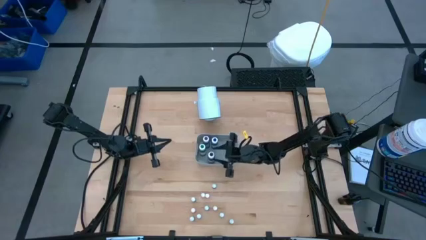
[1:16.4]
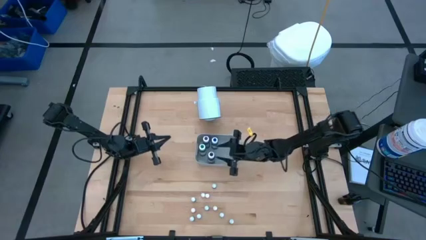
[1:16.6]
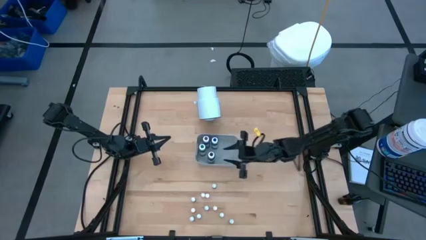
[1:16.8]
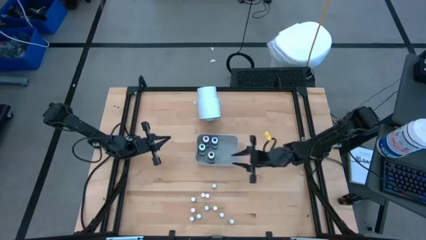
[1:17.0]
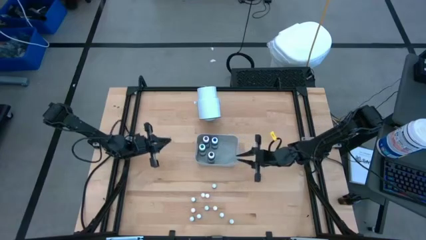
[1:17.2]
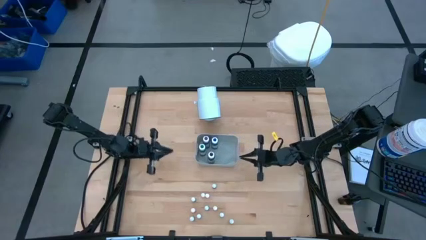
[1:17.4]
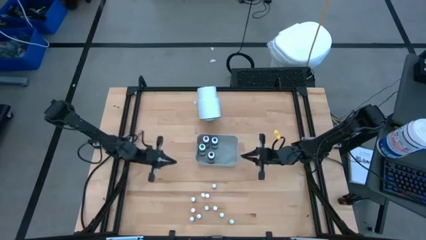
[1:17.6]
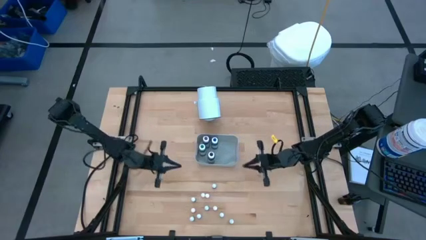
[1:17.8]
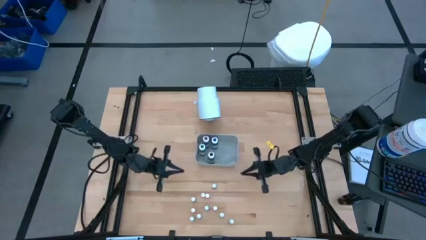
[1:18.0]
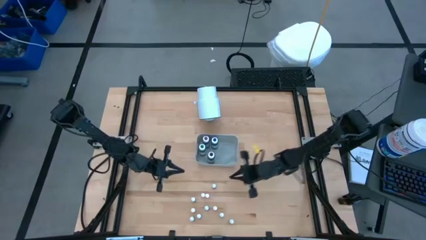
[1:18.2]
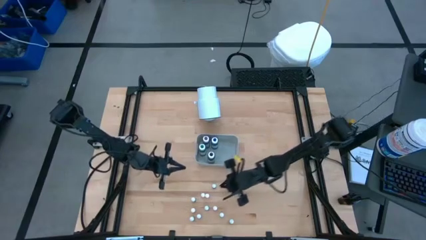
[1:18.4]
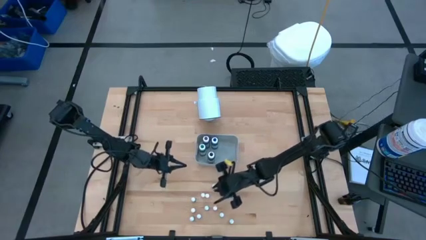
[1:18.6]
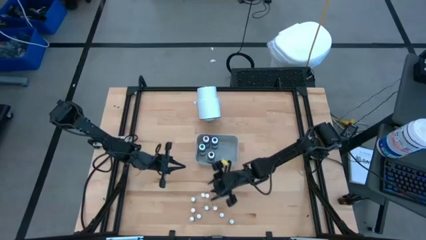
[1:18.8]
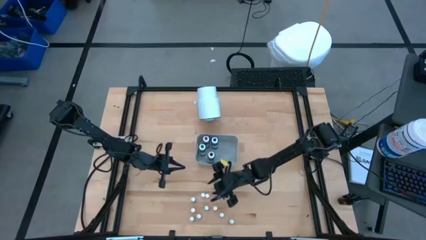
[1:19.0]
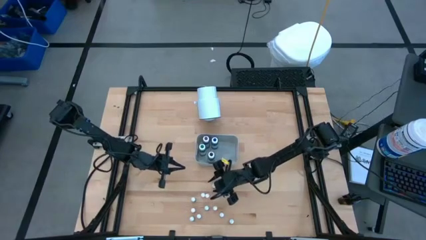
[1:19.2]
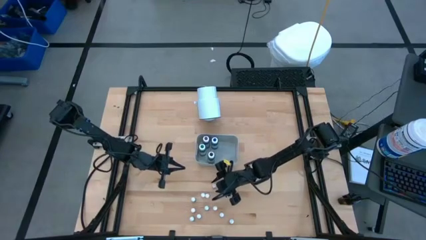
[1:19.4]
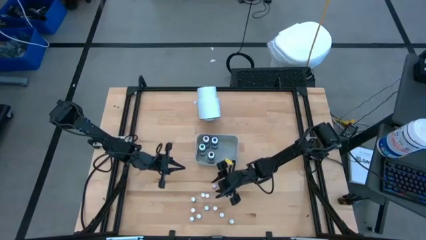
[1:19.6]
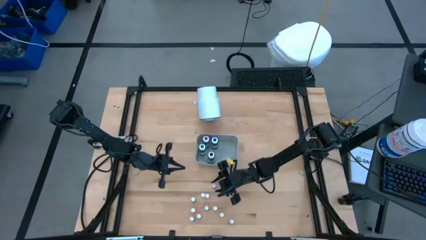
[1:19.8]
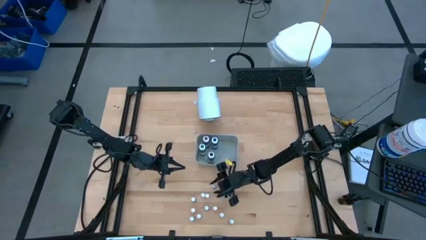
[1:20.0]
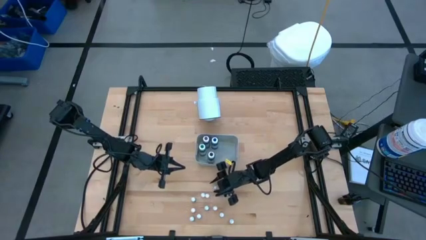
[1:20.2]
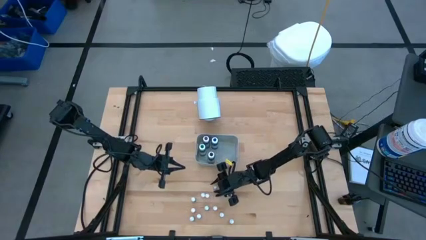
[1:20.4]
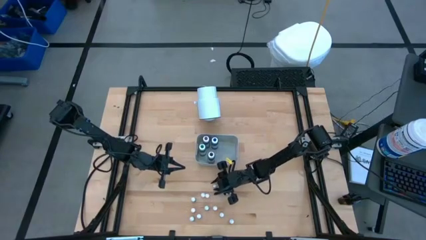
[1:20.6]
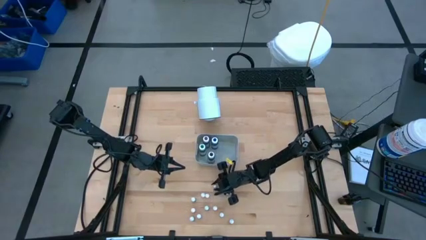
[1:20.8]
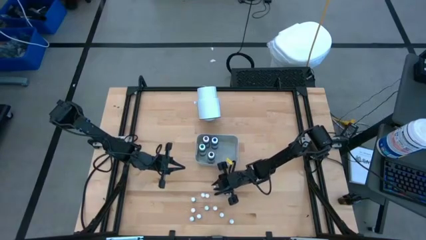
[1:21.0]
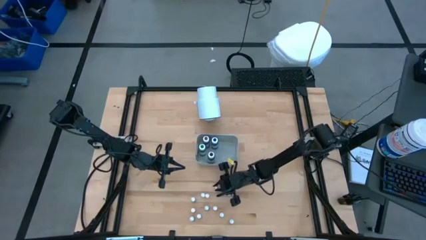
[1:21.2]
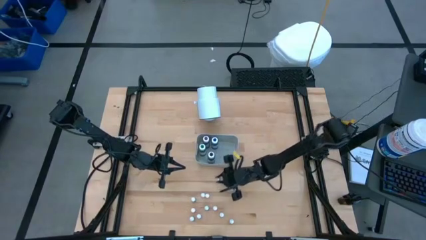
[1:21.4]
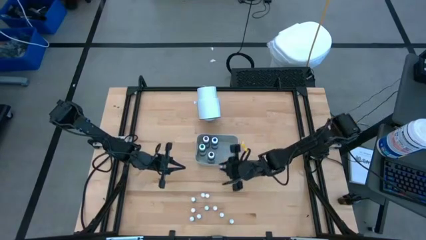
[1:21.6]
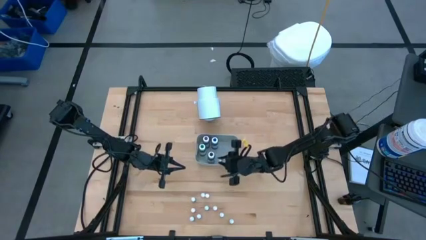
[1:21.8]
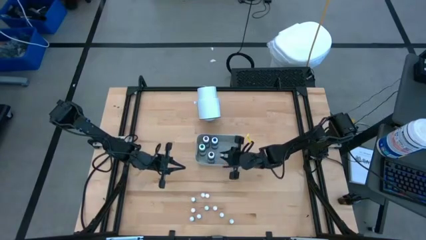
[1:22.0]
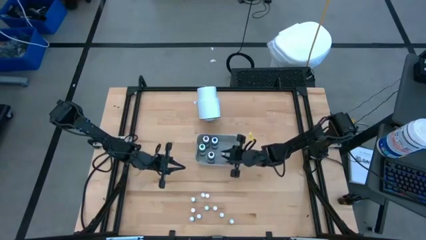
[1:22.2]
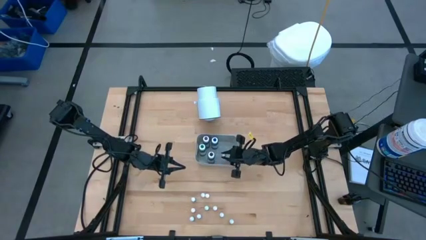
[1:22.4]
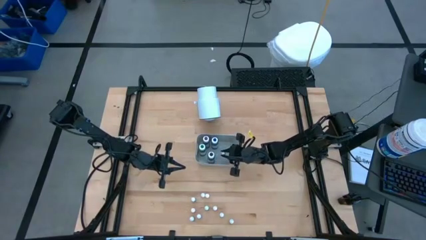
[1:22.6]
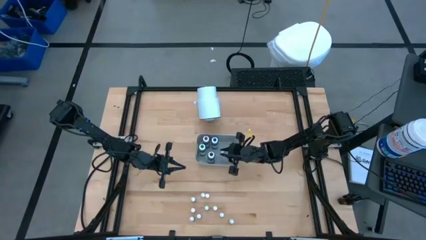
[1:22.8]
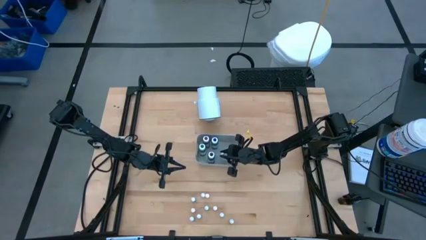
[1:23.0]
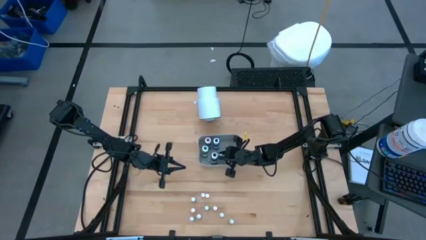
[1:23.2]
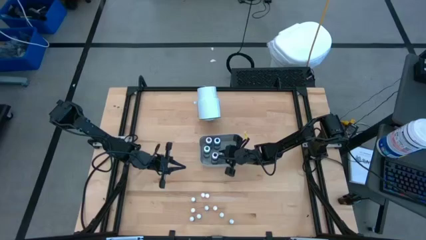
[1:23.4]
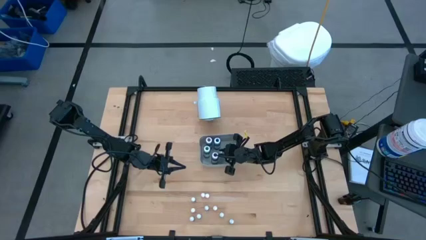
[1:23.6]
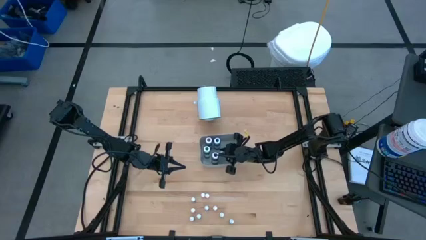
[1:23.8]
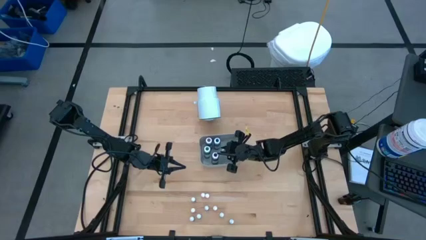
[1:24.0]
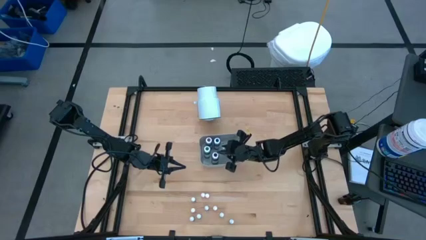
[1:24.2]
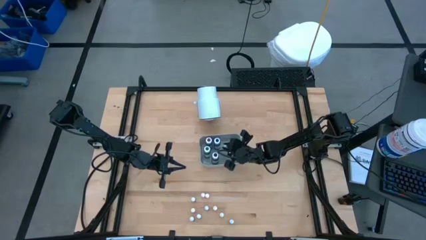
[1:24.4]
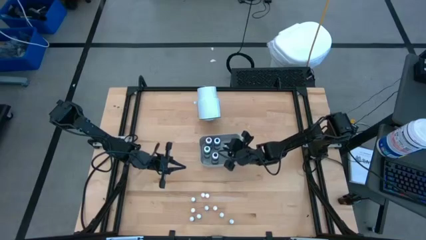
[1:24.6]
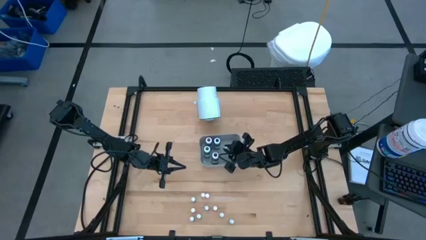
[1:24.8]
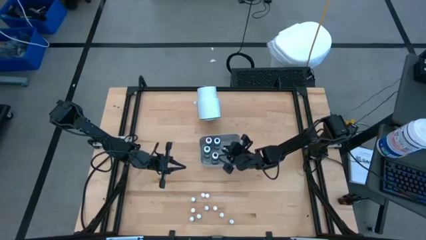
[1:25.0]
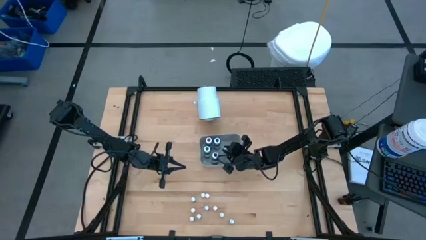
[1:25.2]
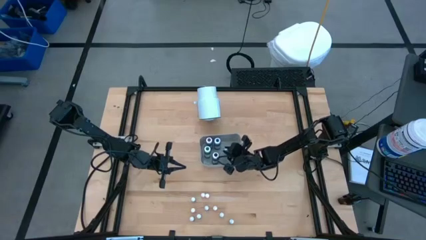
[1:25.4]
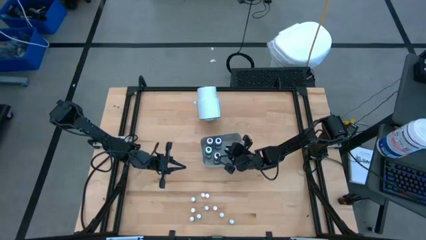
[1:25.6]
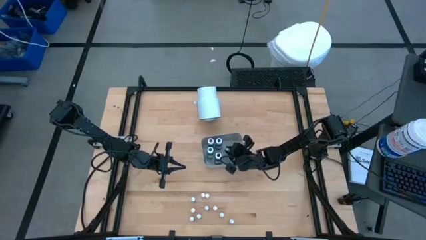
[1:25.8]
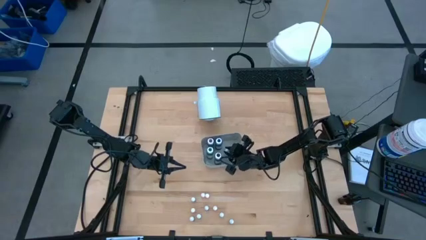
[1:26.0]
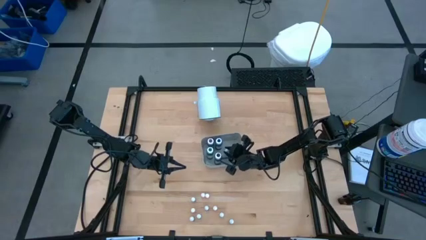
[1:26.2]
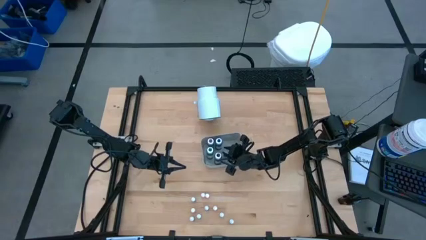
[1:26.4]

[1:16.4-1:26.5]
Task: Pick & Place food coloring
Put the blue food coloring bottle into the gray bin

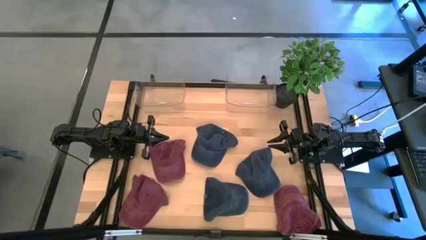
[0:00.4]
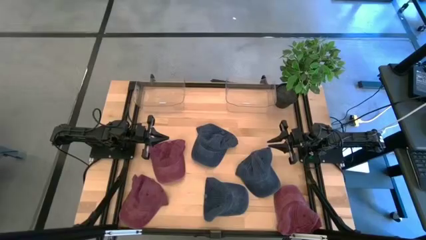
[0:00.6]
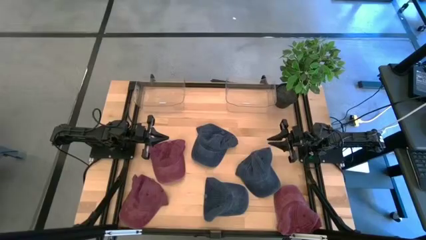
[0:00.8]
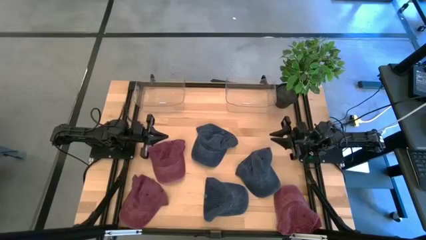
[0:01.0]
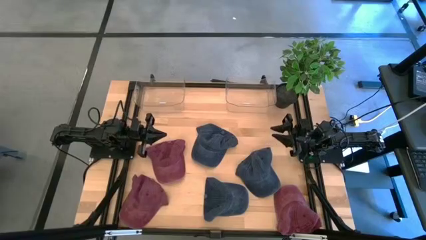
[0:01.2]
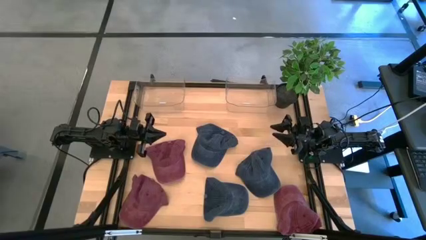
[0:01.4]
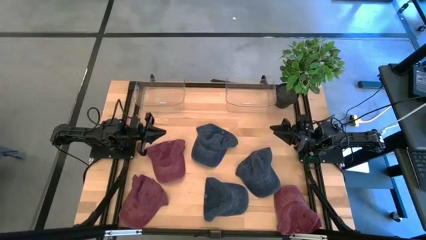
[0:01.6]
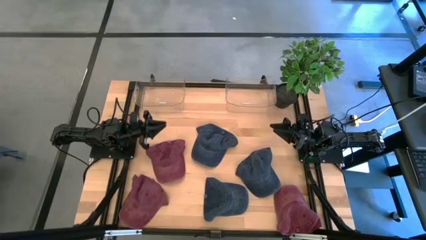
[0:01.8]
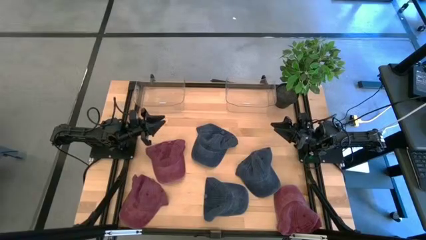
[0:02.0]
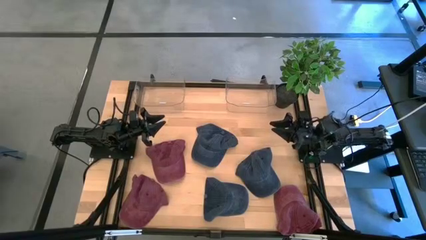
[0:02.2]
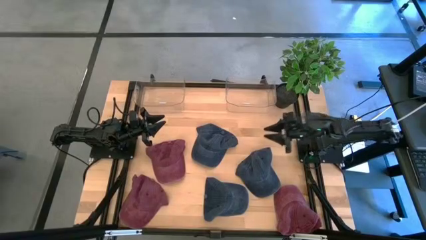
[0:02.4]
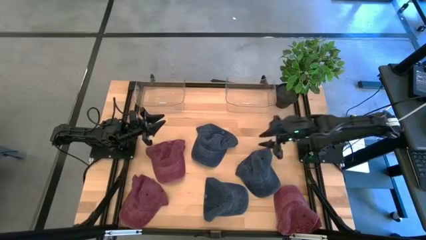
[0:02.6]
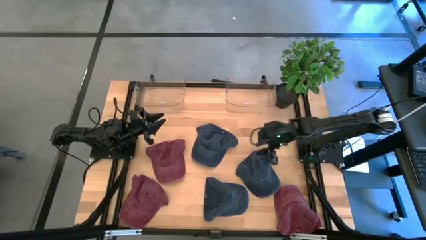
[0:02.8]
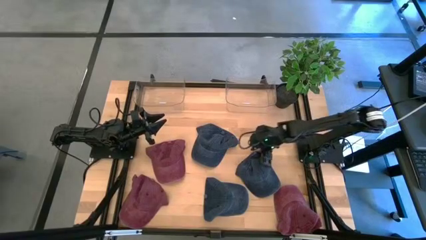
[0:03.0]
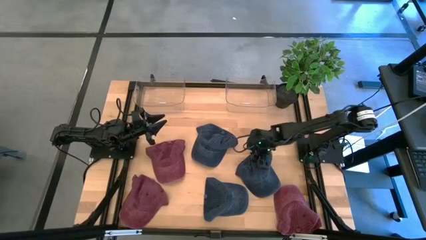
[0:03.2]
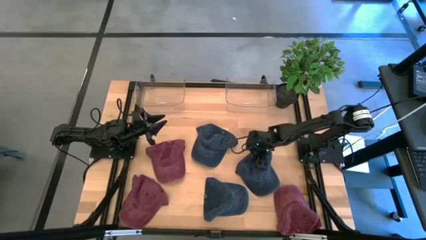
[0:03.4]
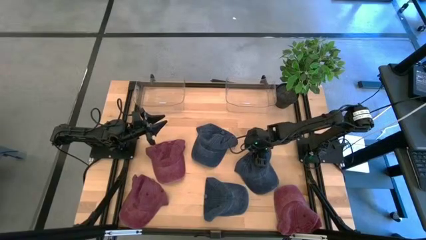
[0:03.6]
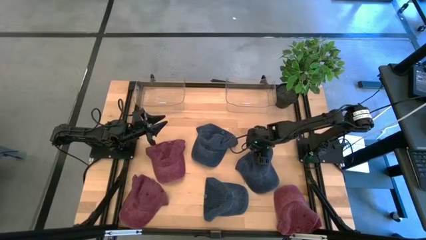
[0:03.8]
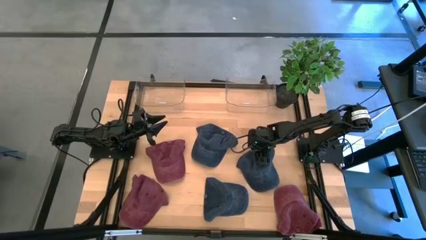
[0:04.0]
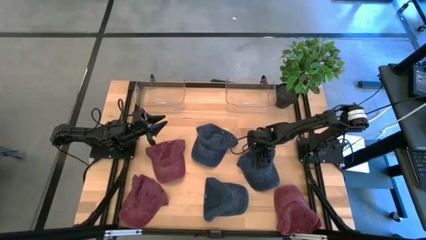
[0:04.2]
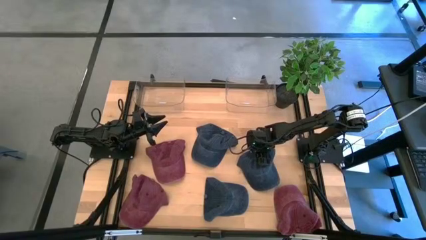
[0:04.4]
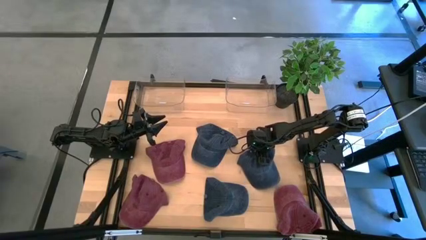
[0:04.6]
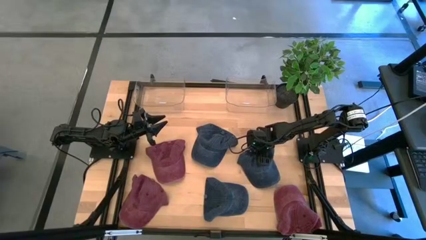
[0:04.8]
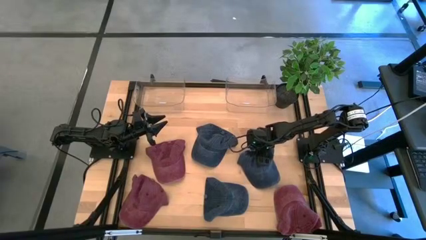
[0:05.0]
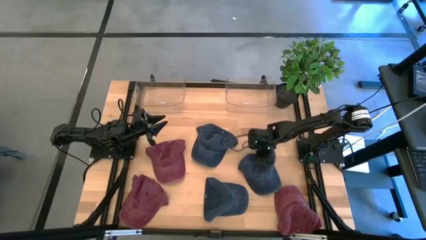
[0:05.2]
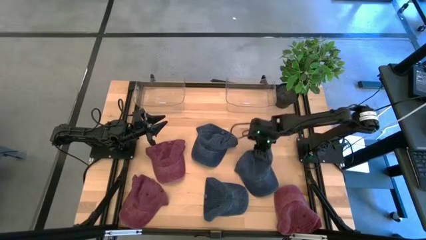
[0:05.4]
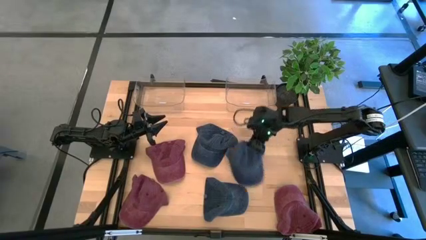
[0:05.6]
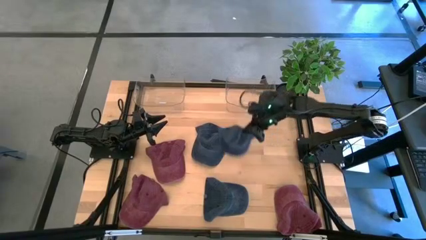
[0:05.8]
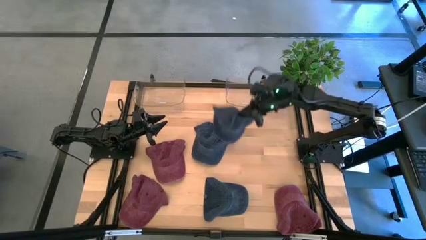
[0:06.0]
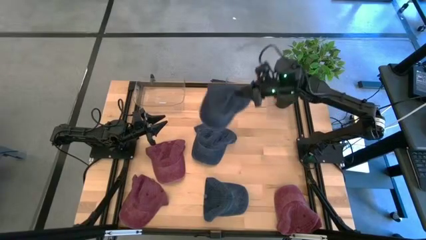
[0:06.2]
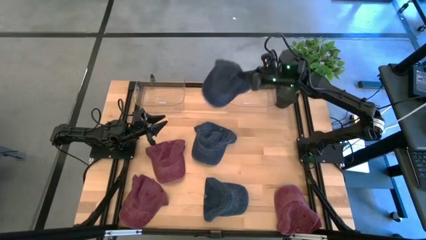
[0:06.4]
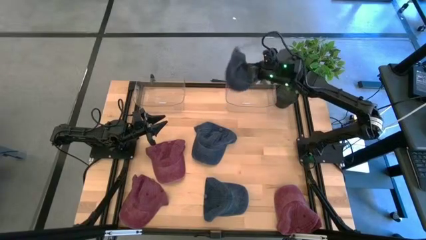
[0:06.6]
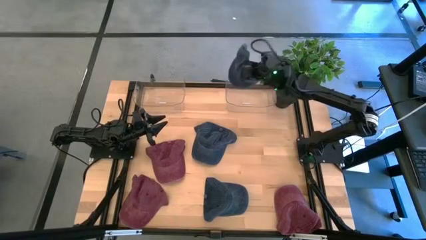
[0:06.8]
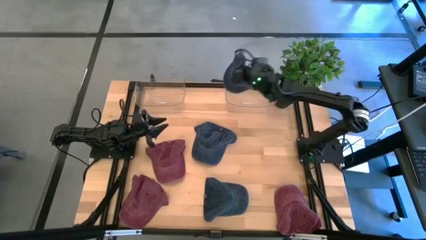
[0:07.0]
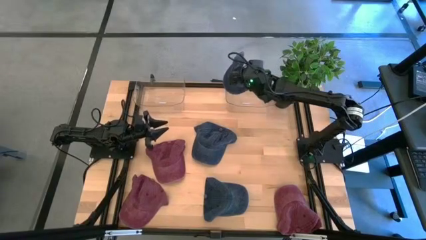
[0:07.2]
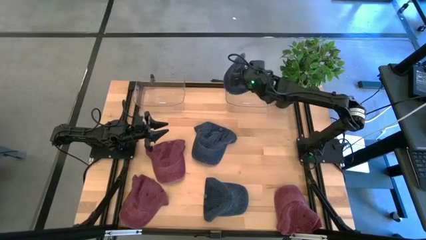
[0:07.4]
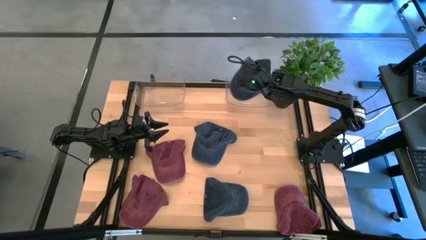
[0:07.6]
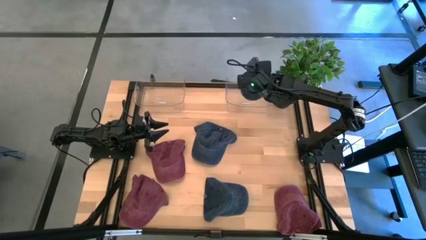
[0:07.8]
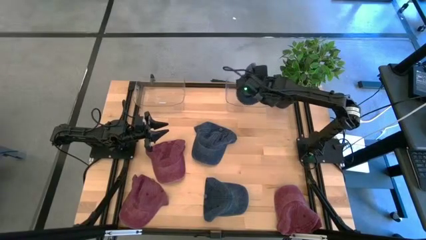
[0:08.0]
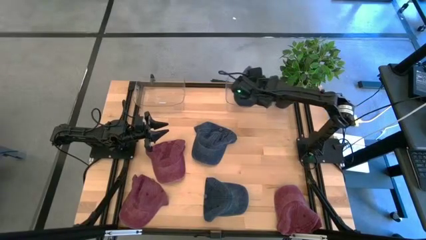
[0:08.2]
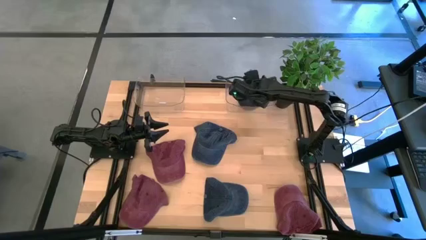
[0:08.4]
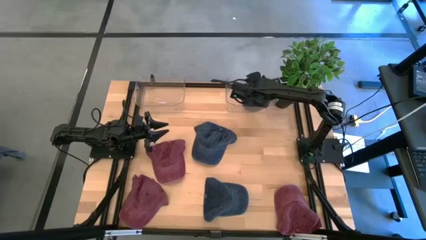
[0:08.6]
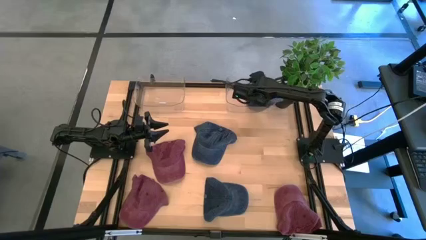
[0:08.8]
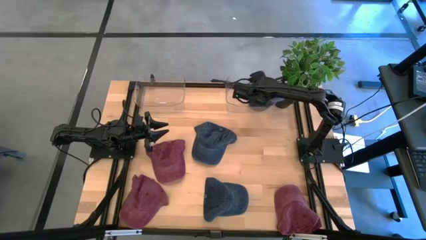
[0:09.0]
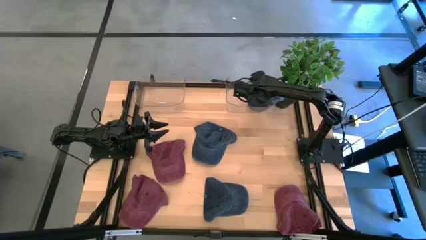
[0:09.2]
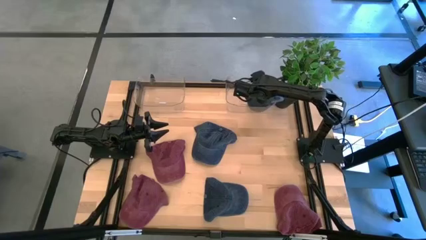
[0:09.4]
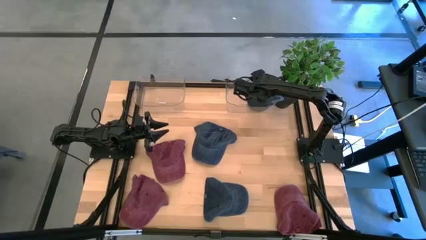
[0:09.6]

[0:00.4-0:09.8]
Task: Pick & Place hat
Put the right blue cap into the right transparent bin
